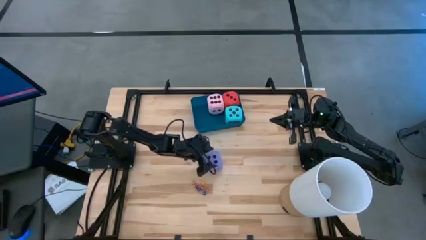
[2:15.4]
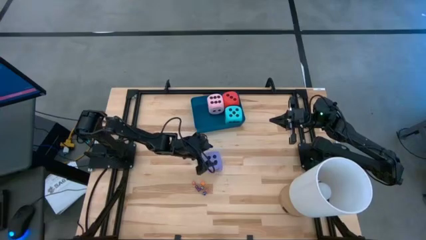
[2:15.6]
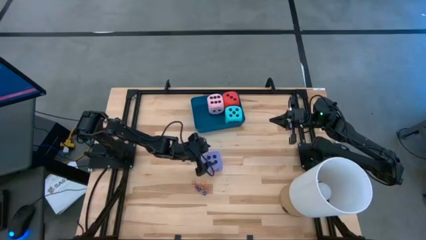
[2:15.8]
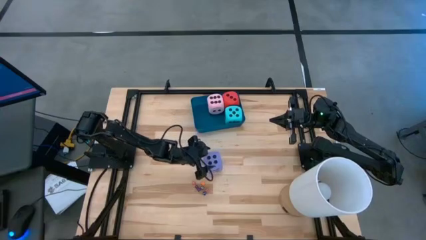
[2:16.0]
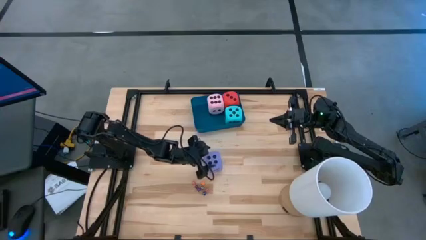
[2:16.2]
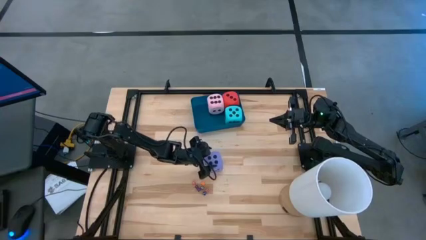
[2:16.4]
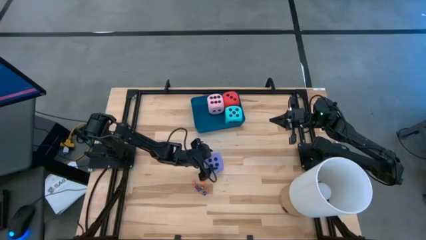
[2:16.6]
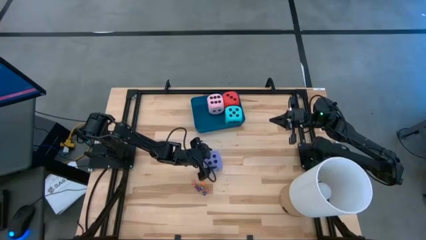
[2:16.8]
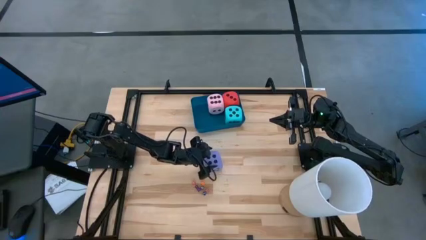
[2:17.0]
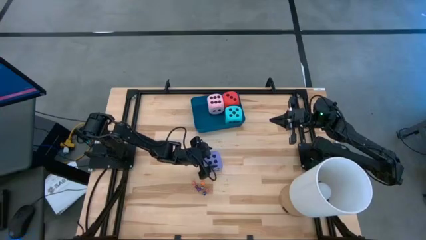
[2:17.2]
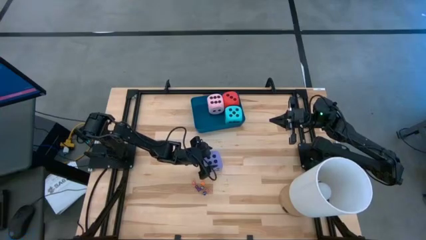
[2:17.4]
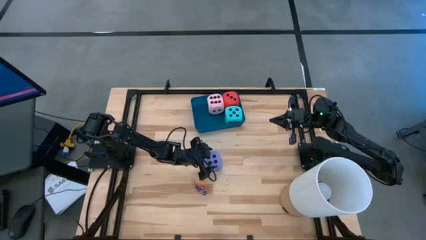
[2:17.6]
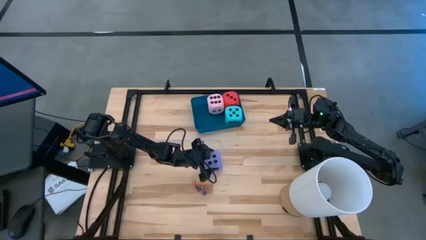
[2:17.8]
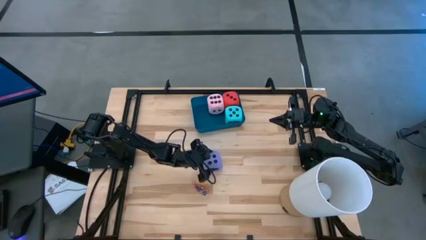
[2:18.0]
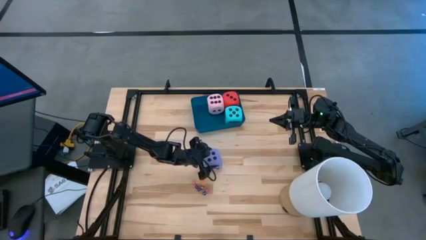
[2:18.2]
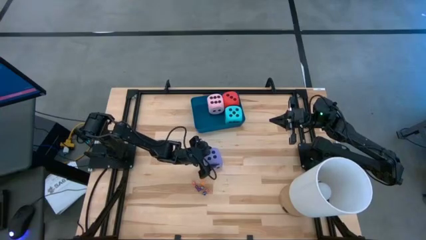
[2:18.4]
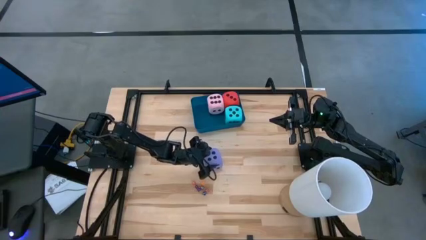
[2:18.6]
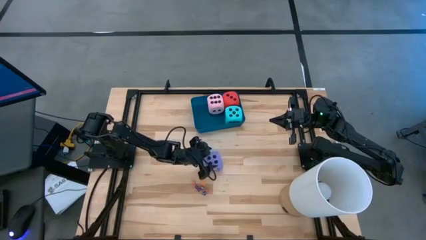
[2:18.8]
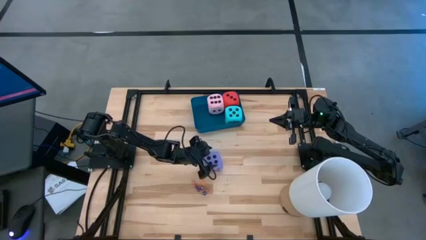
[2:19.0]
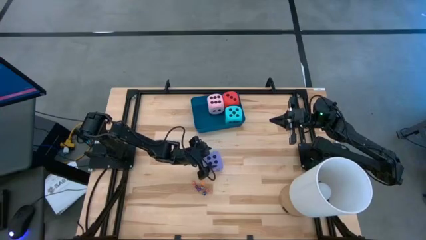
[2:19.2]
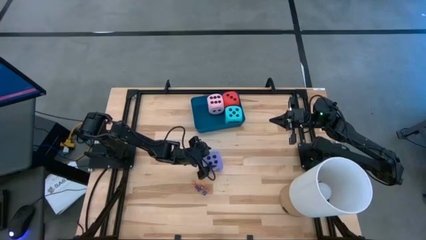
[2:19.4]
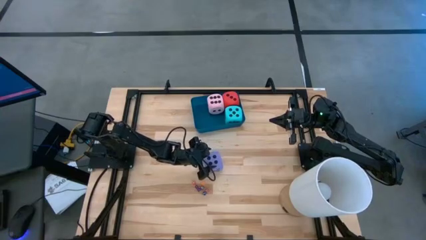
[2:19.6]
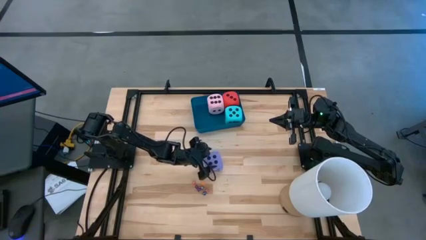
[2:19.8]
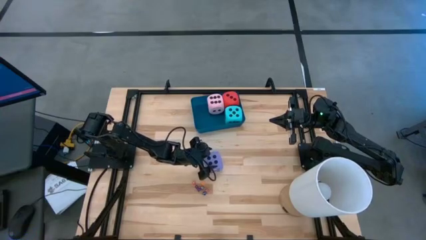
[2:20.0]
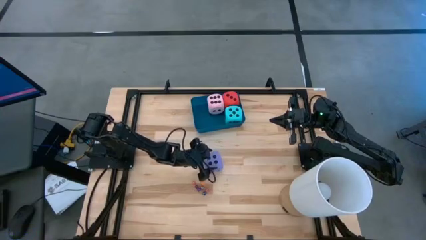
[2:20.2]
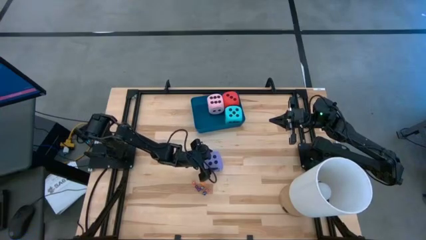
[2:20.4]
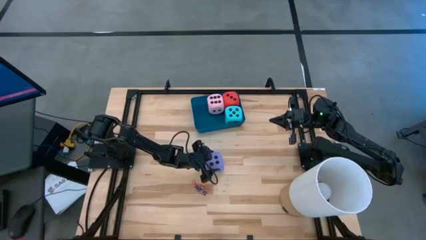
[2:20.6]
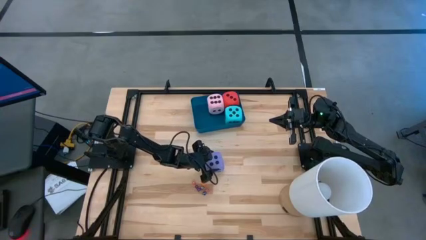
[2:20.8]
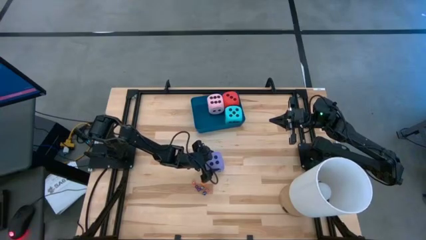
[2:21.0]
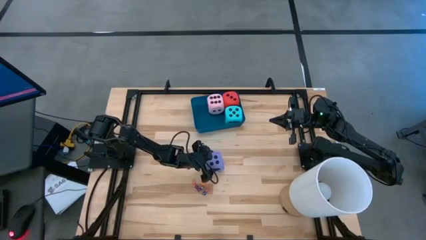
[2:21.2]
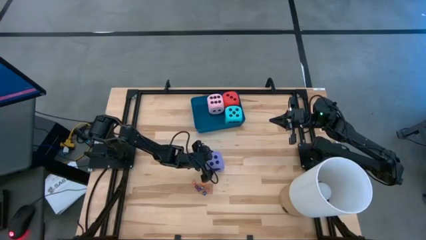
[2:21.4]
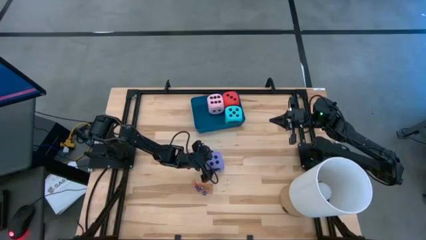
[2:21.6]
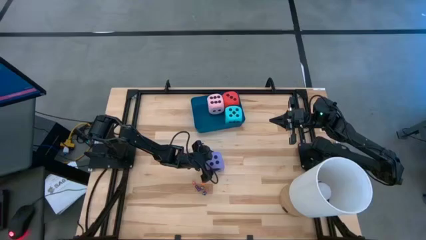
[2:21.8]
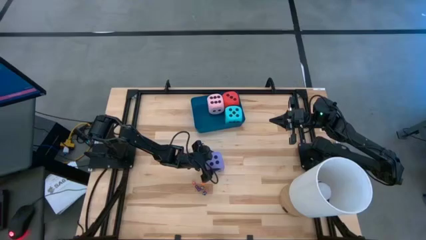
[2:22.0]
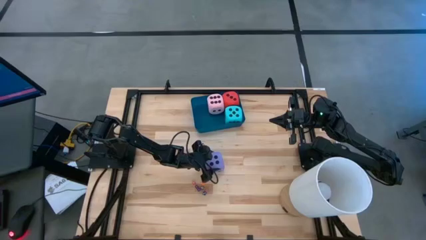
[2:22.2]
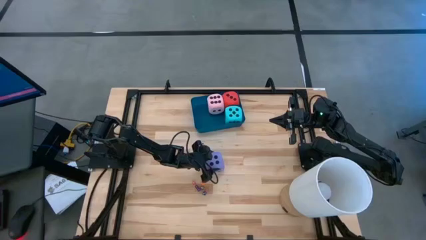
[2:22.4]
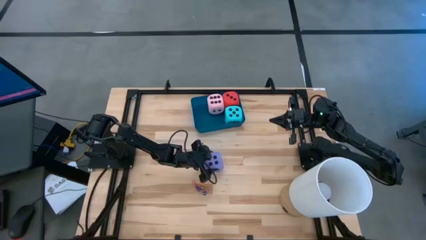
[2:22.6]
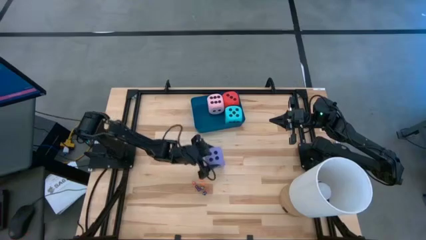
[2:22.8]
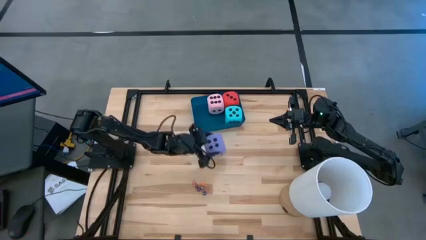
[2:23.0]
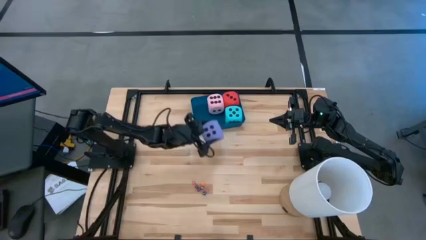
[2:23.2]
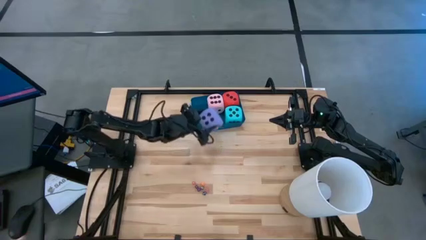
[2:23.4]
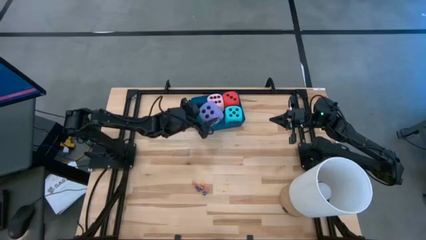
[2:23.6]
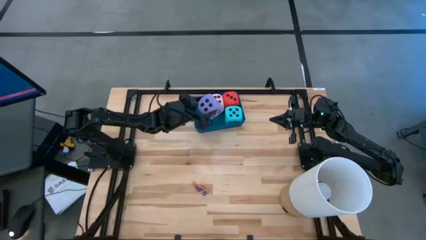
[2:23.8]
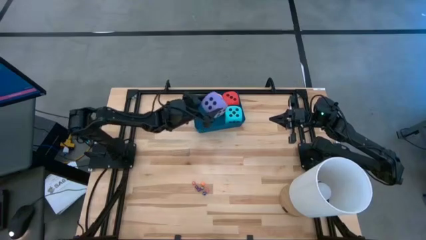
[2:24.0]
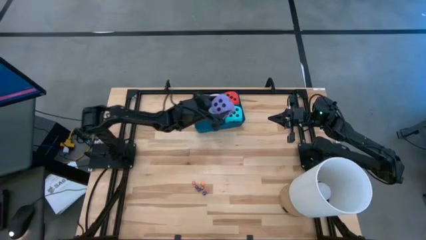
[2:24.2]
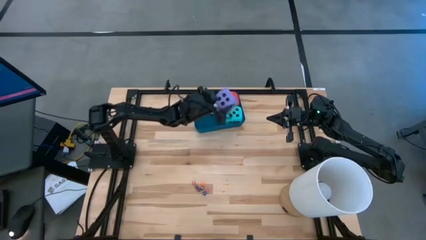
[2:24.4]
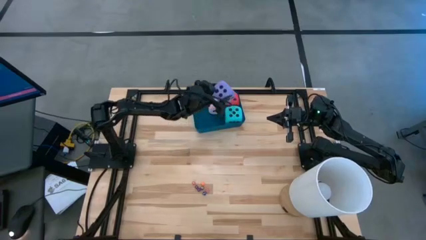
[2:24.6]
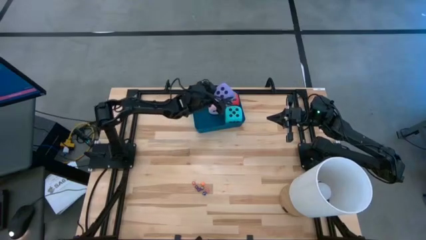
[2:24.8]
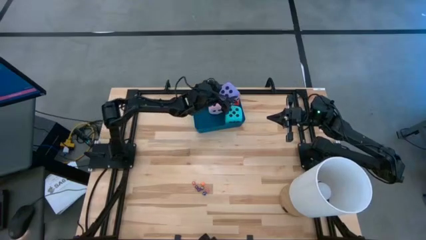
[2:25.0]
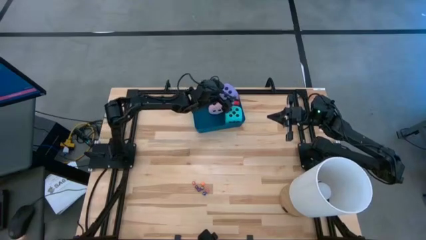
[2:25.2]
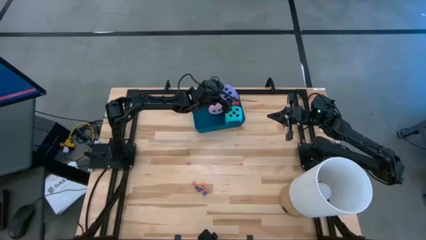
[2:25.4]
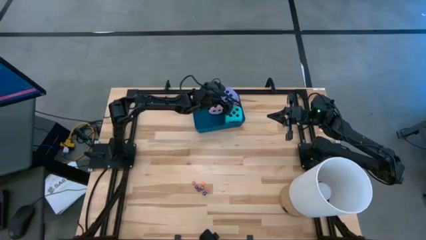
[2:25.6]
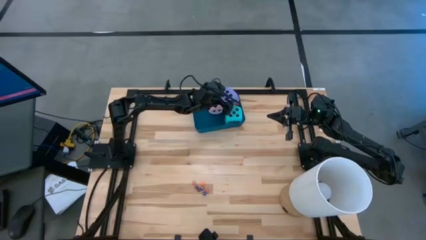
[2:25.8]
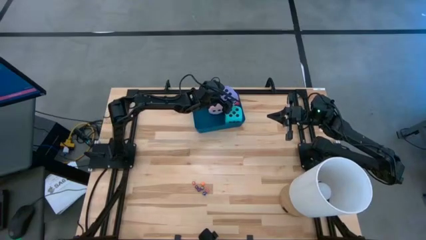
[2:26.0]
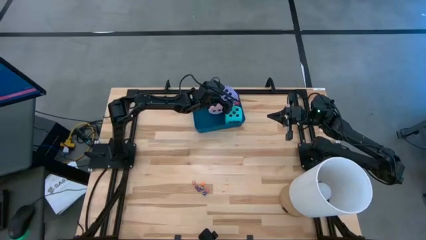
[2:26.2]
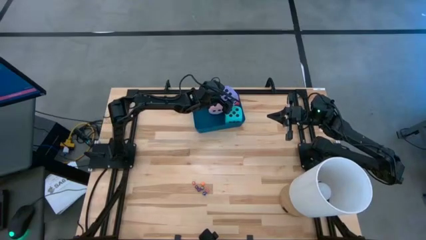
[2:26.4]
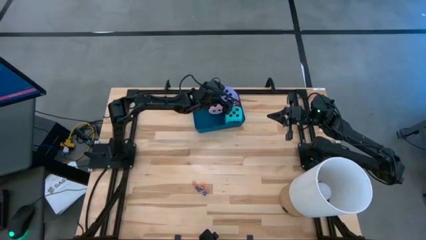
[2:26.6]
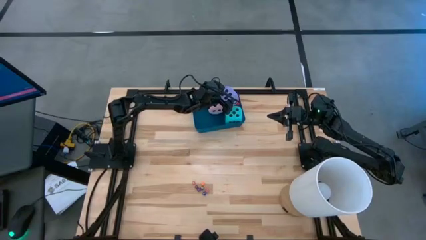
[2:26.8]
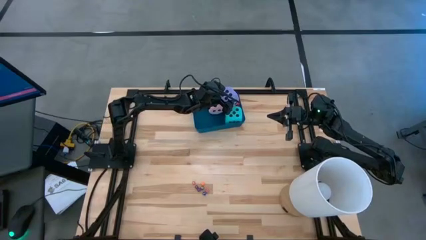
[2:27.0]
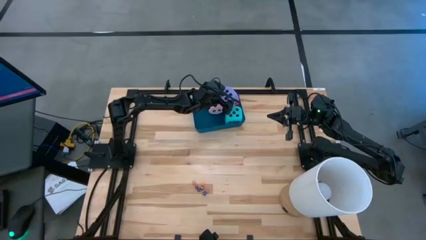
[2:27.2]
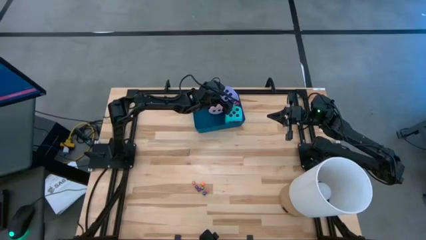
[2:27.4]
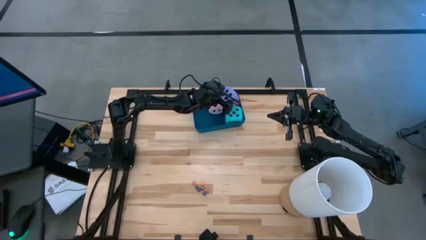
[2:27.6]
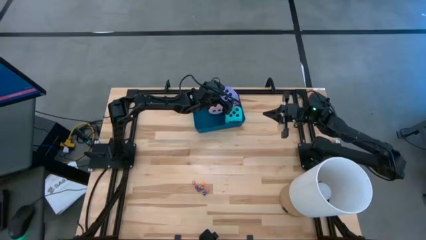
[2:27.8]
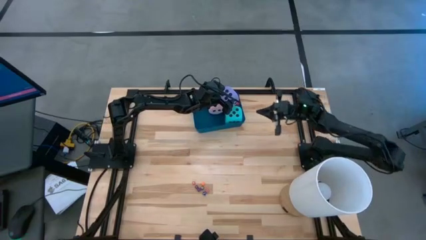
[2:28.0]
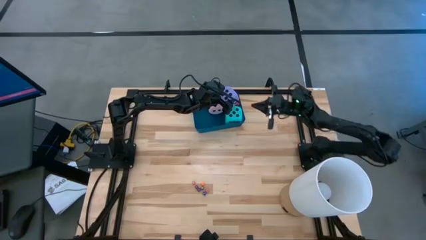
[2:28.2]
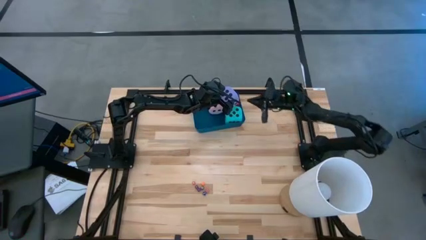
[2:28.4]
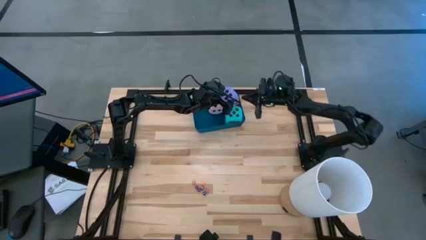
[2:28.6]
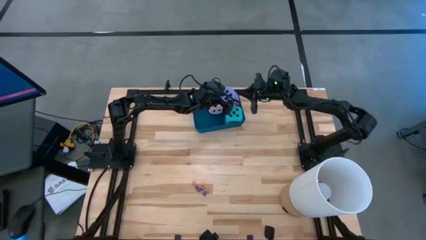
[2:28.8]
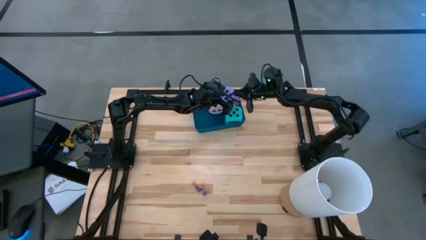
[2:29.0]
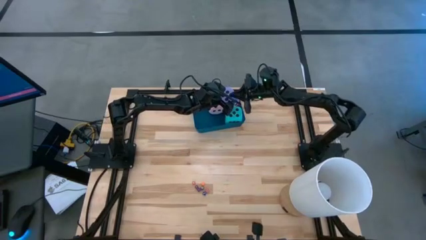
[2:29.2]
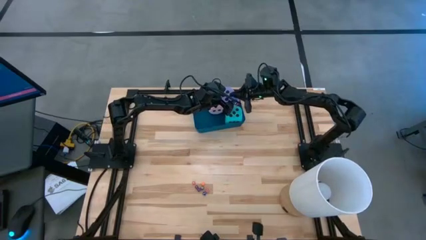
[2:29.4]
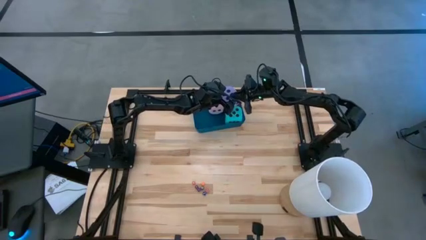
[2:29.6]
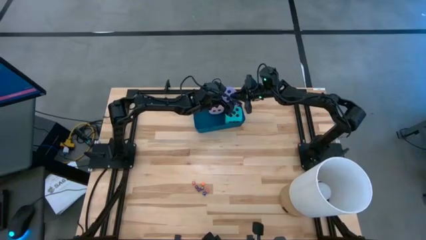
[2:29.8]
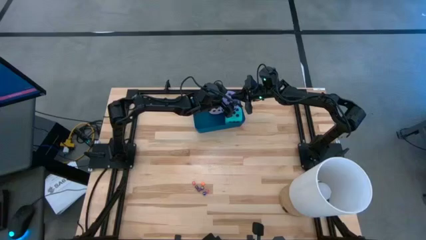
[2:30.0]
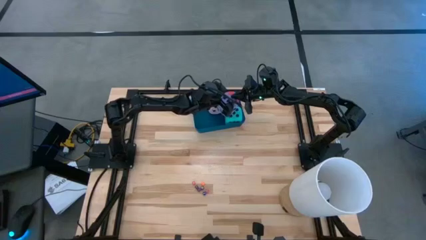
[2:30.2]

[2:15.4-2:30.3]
Task: Pick & Place Dice
Put the large purple dice into the blue bin
